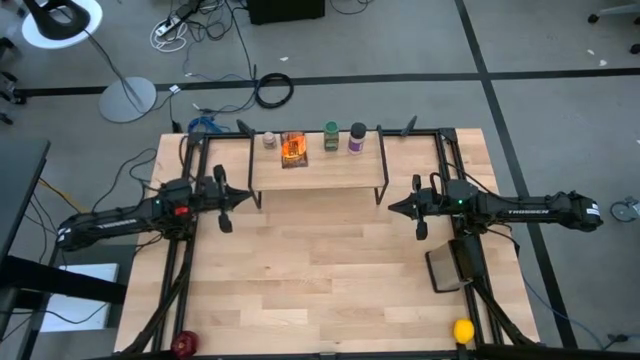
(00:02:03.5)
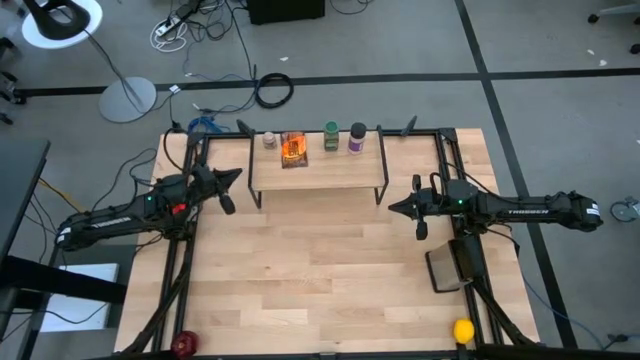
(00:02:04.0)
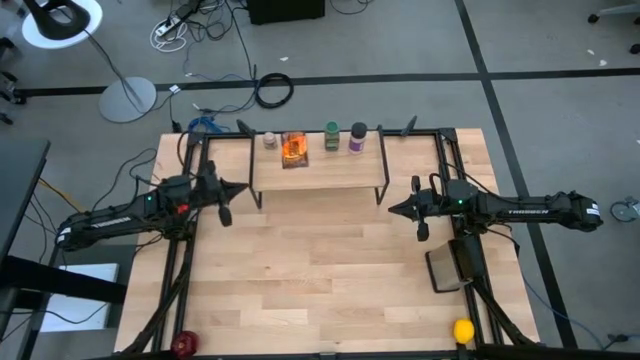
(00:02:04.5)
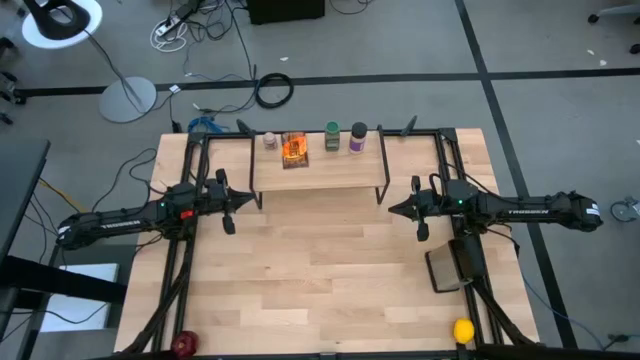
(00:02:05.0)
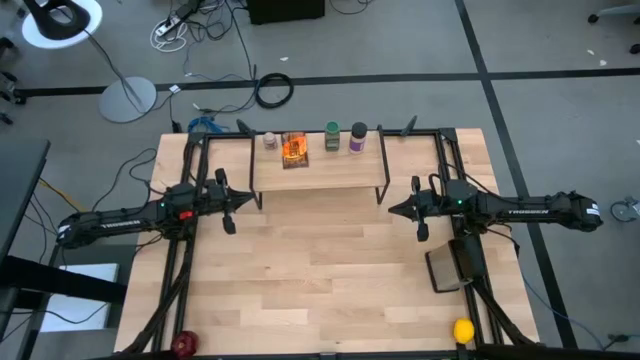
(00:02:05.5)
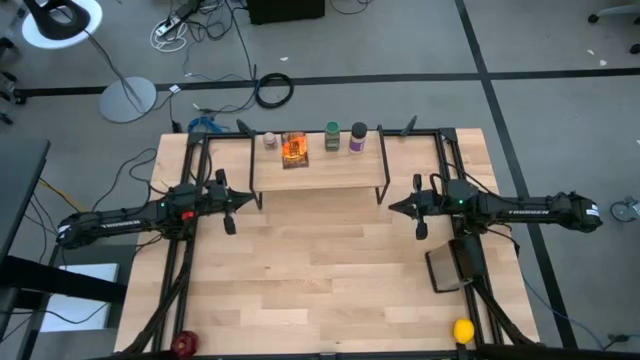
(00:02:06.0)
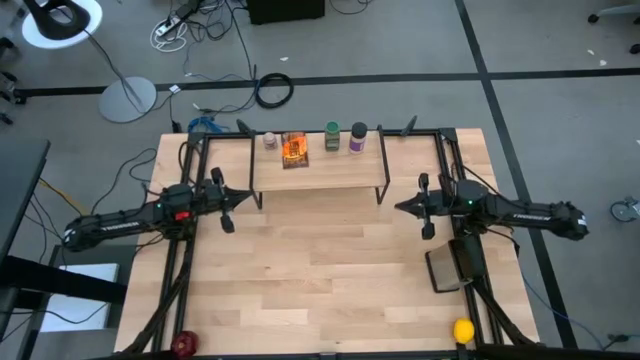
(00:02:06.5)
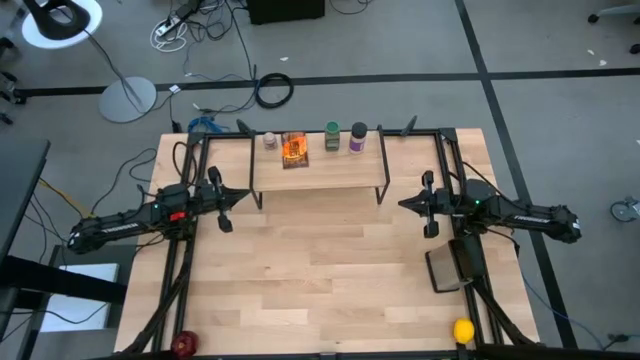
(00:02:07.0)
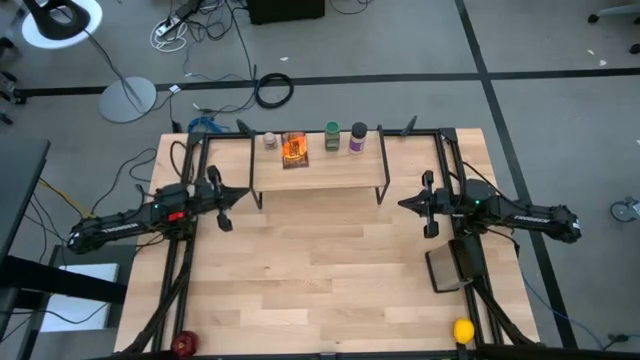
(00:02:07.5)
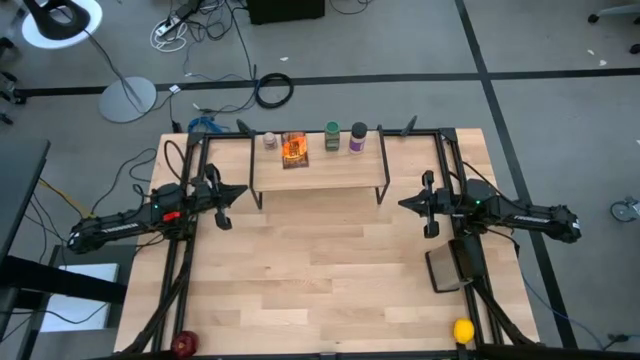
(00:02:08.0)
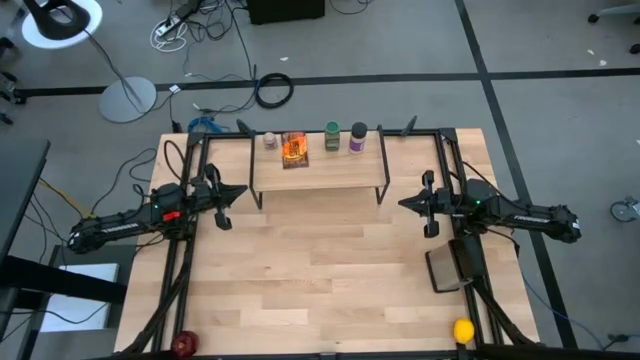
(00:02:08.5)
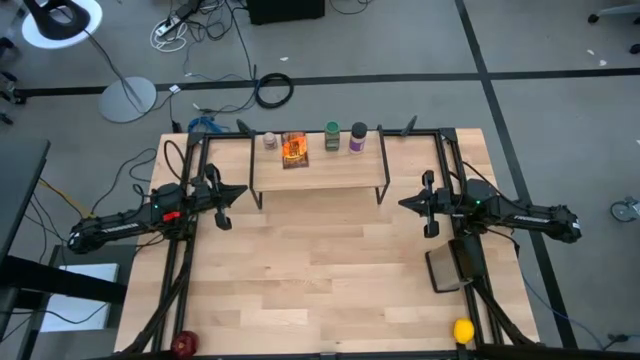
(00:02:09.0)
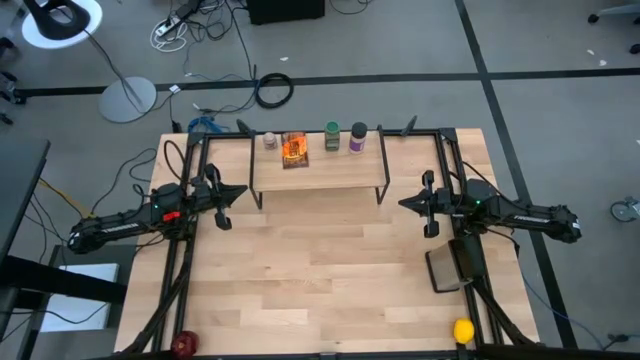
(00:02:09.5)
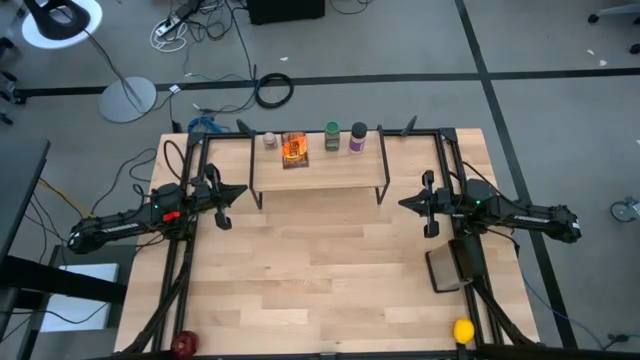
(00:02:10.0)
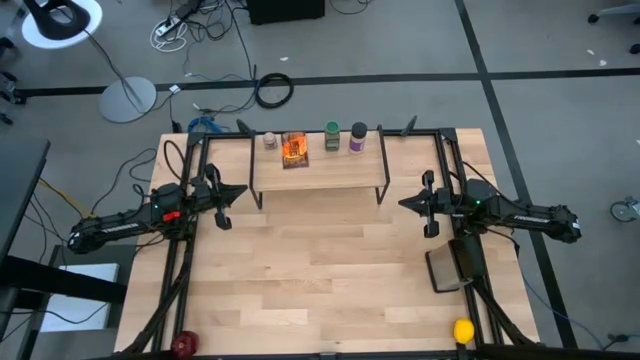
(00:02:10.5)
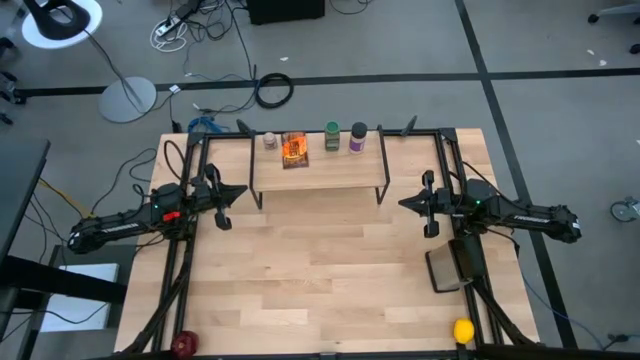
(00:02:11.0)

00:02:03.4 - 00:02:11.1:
Task: Shelf spices
Return to Home Position

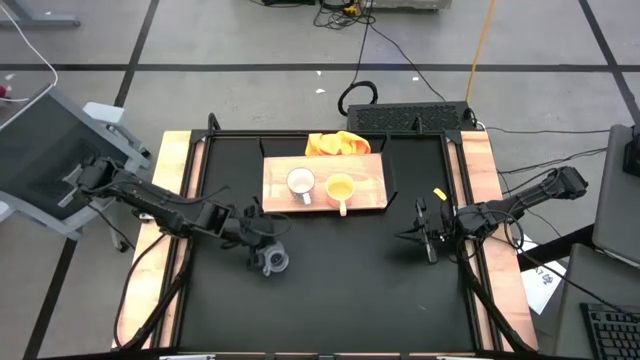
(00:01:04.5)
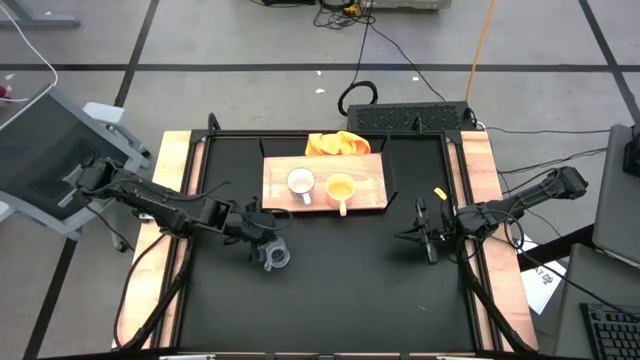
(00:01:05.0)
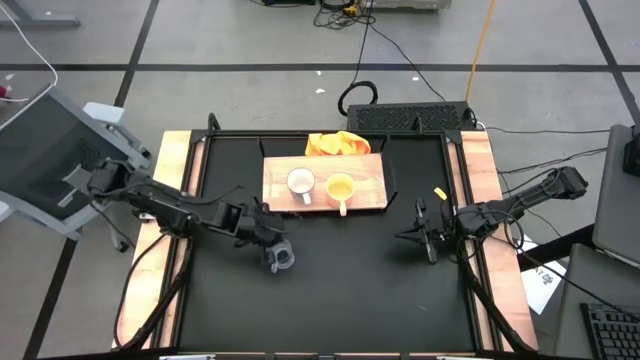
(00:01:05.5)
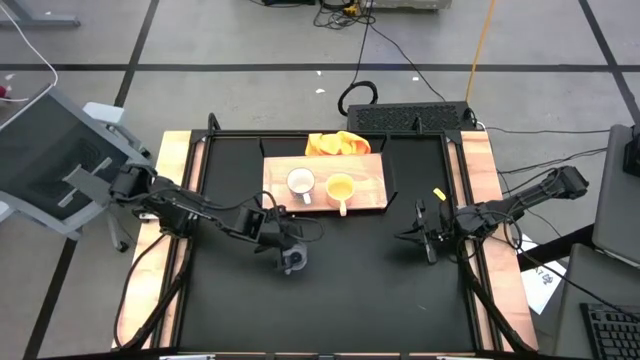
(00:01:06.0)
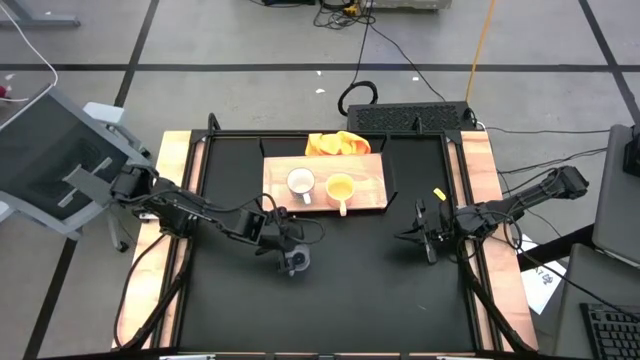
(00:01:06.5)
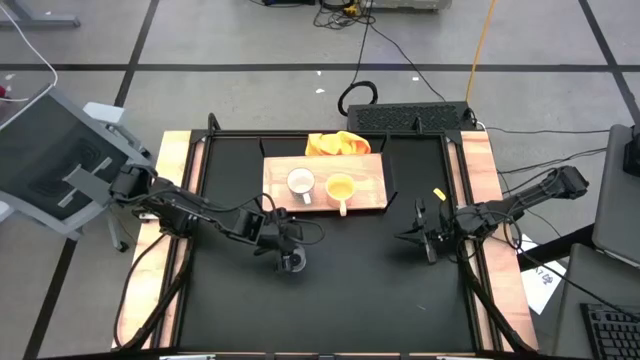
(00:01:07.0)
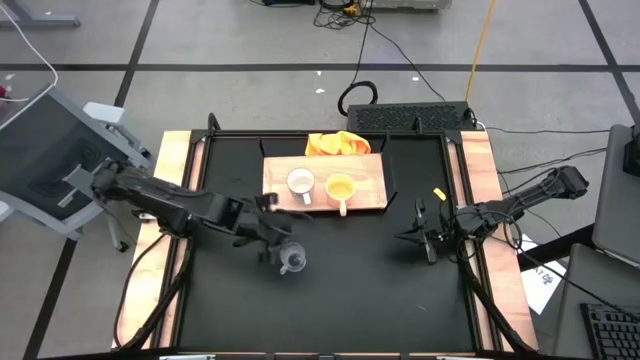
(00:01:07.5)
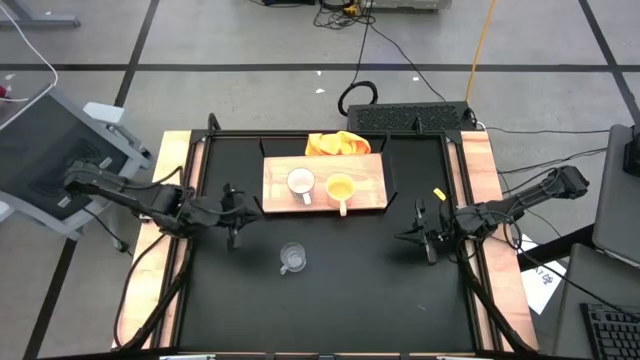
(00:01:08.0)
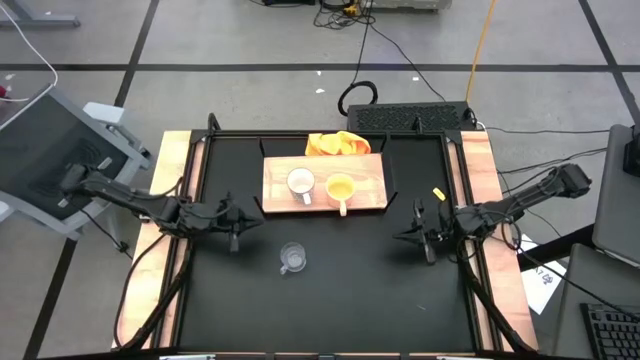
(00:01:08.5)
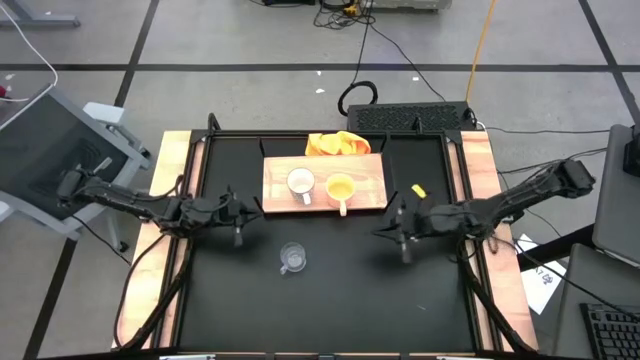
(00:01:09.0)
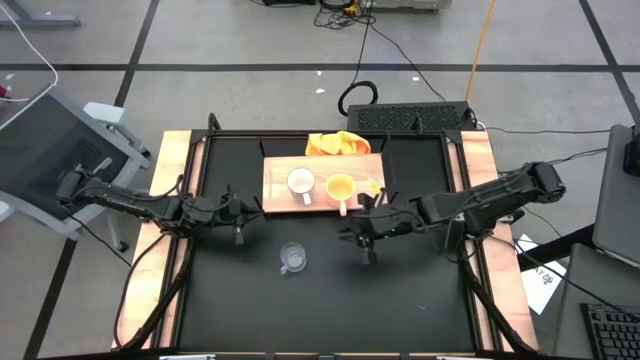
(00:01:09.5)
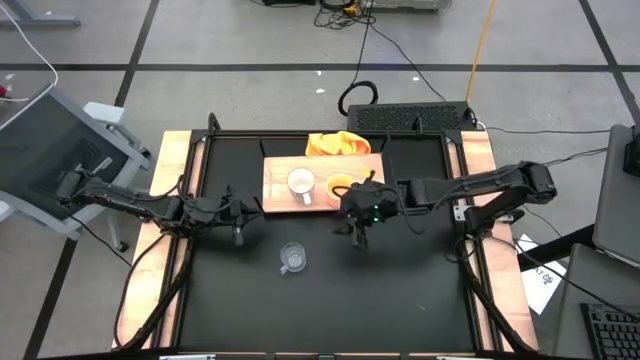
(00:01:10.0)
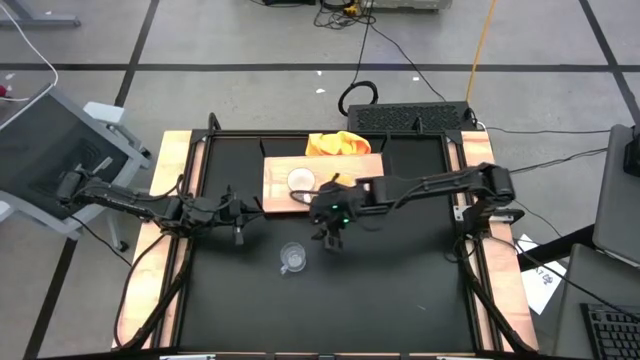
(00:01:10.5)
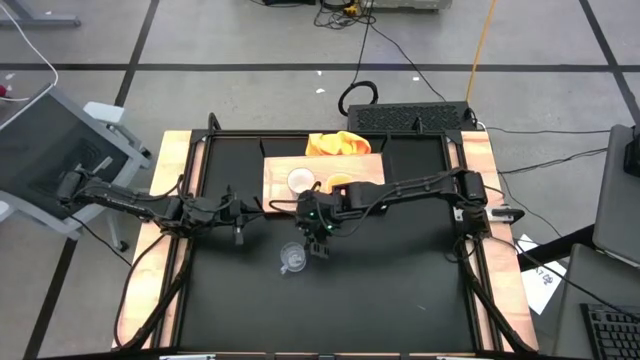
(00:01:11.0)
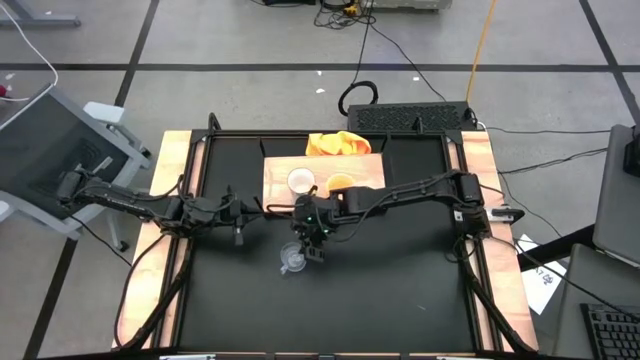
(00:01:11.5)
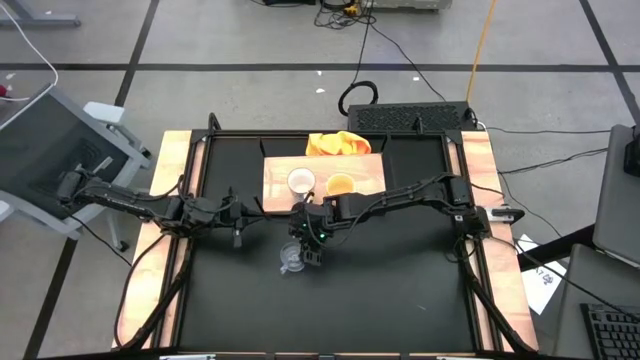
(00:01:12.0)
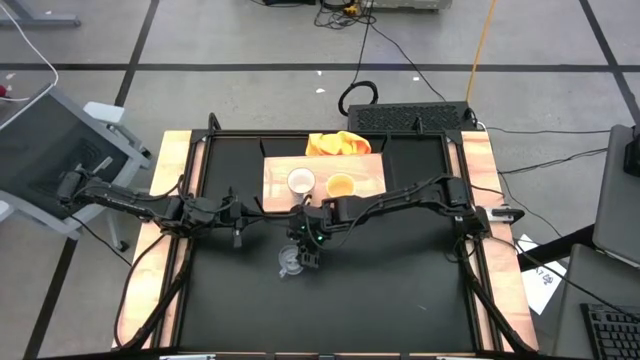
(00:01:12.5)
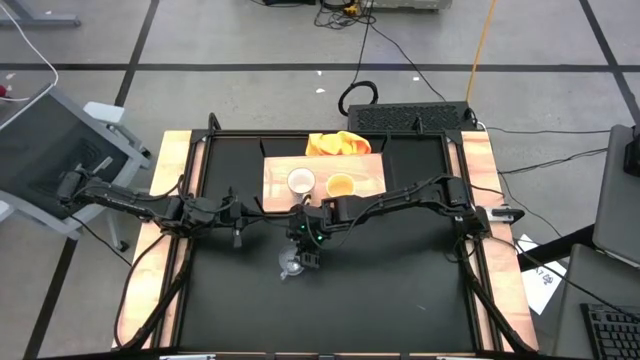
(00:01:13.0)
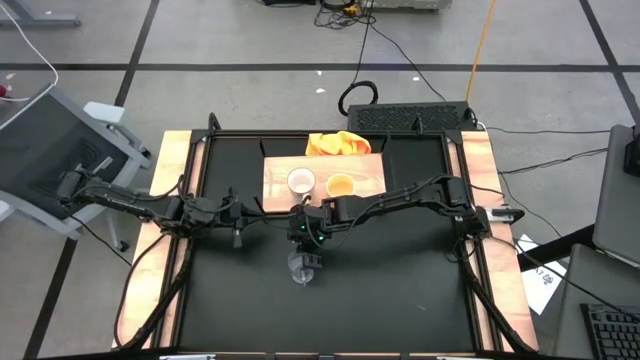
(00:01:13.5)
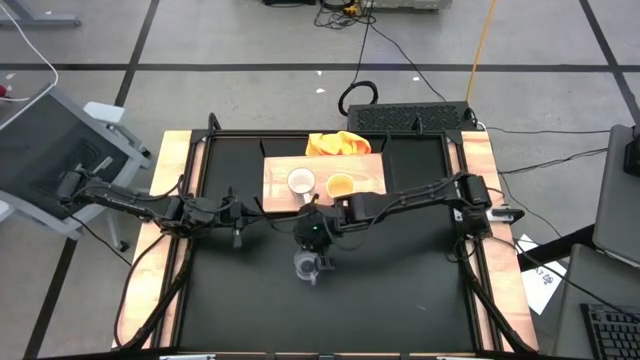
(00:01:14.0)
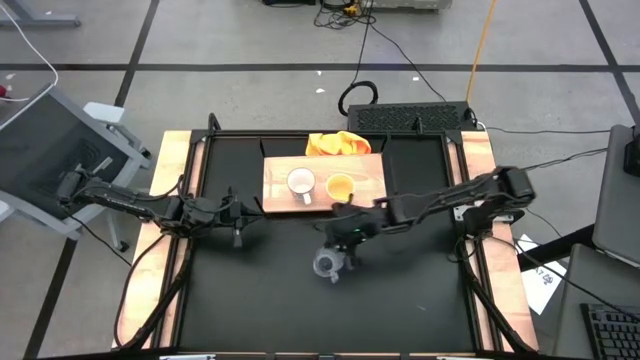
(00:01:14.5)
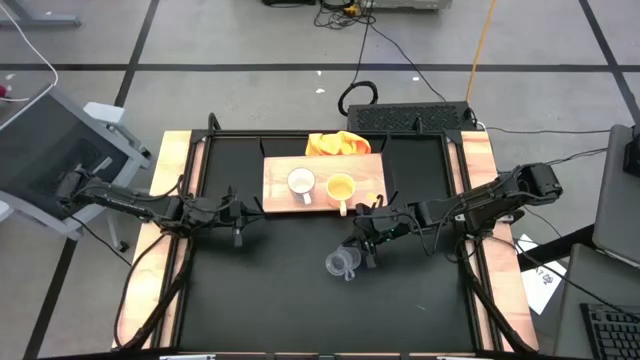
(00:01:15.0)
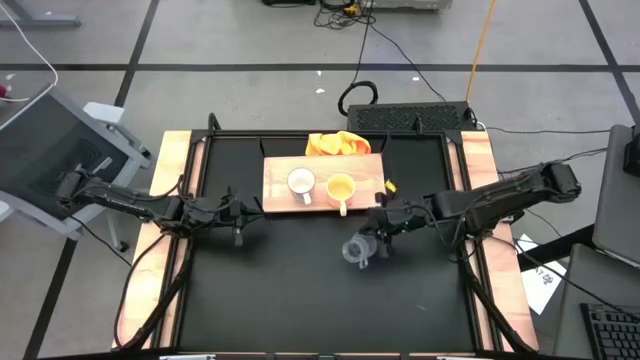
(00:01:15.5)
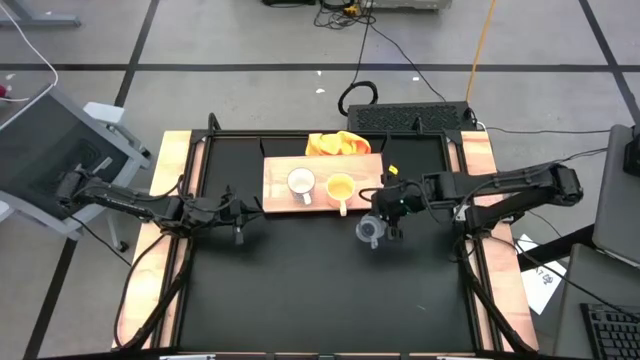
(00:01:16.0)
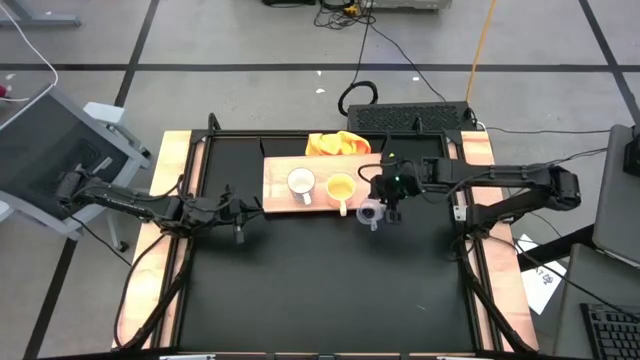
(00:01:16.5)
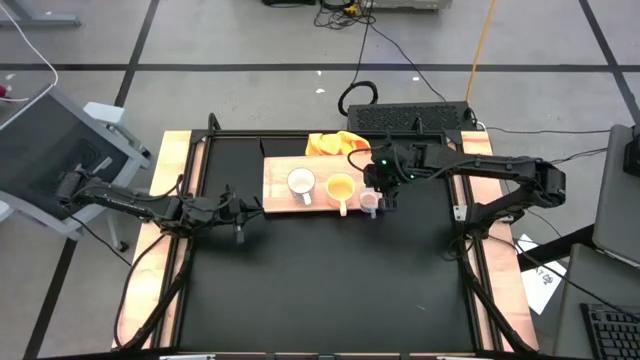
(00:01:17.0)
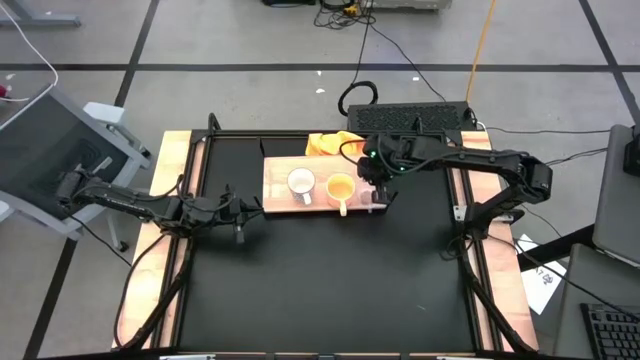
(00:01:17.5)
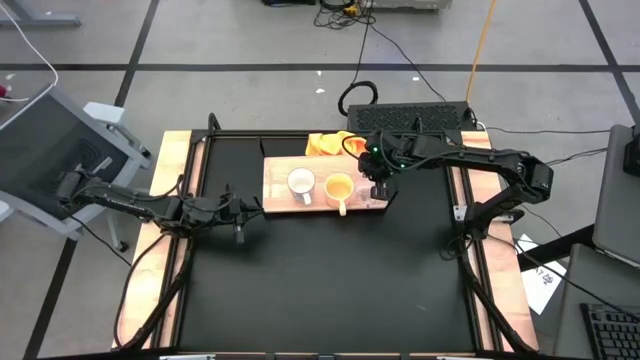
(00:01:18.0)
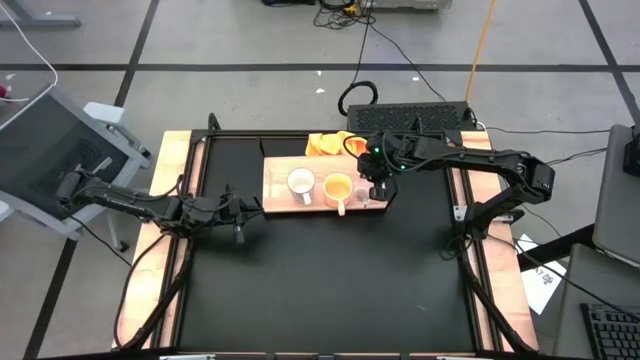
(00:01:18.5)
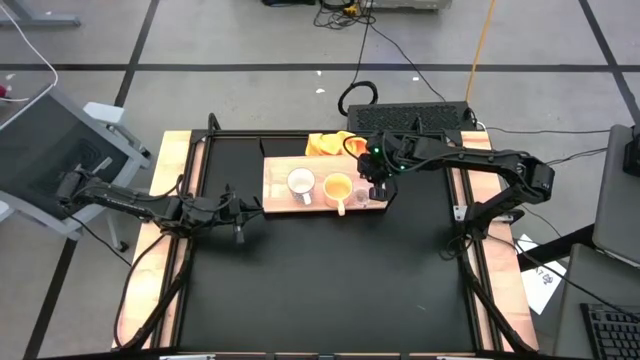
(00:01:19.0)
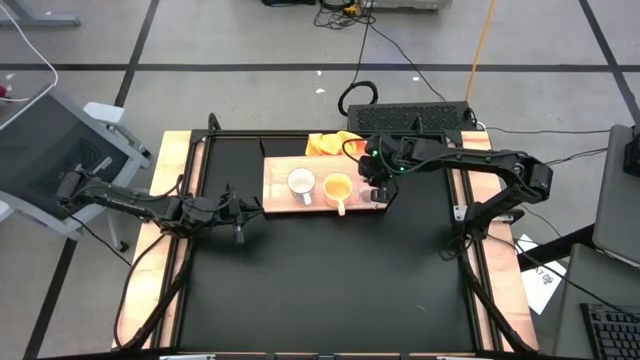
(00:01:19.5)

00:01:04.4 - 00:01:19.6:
Task: Stack small to large cups/mugs on shelf
Put the transparent cup on the shelf
